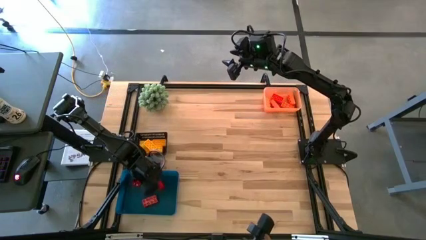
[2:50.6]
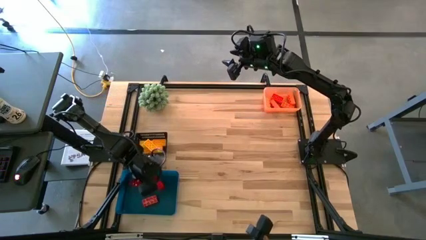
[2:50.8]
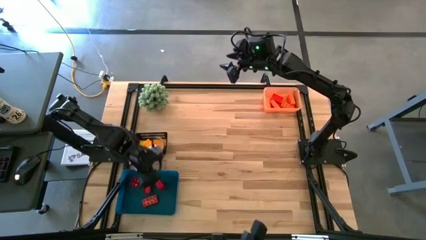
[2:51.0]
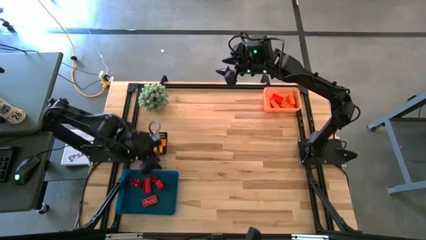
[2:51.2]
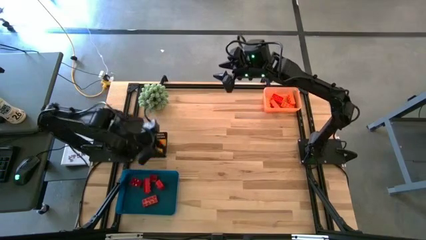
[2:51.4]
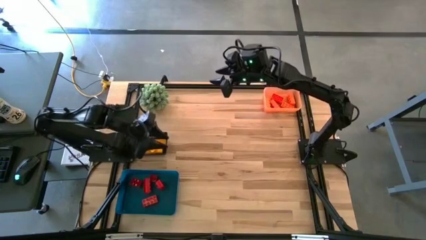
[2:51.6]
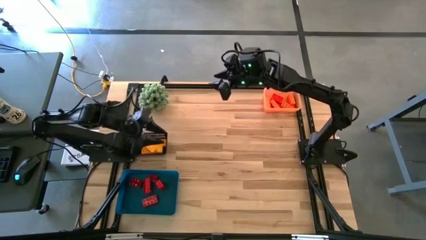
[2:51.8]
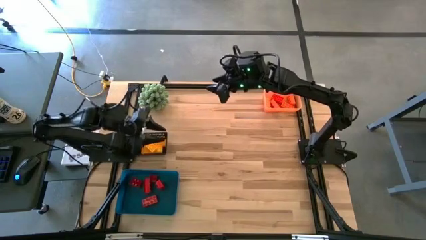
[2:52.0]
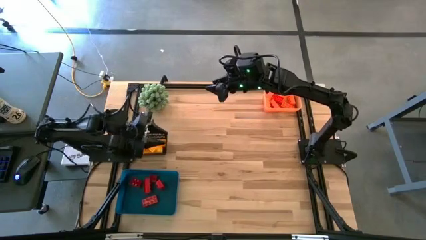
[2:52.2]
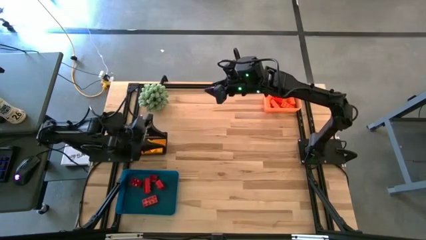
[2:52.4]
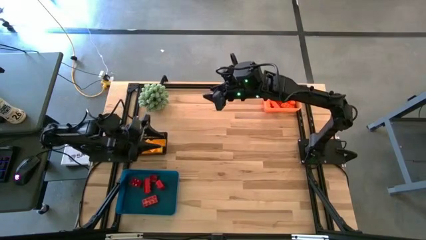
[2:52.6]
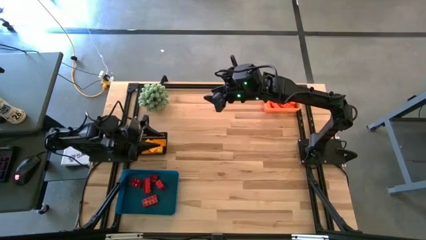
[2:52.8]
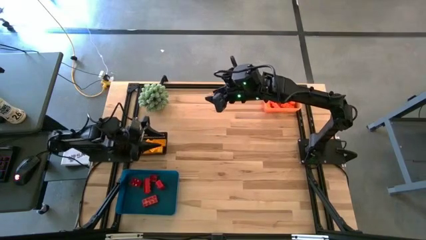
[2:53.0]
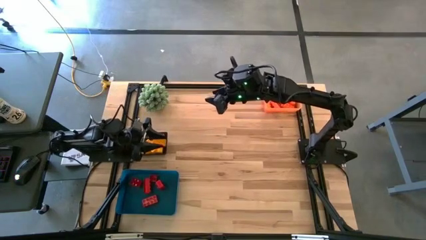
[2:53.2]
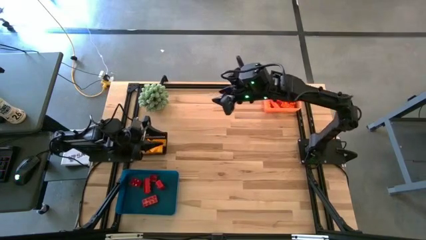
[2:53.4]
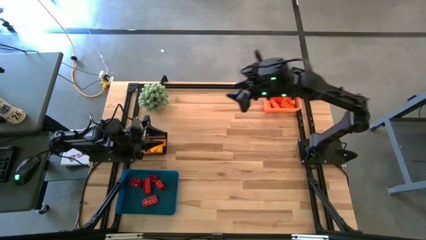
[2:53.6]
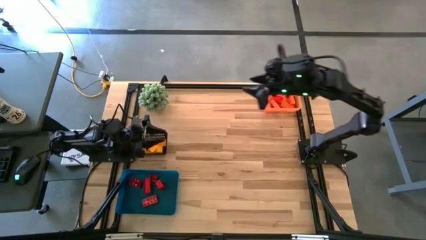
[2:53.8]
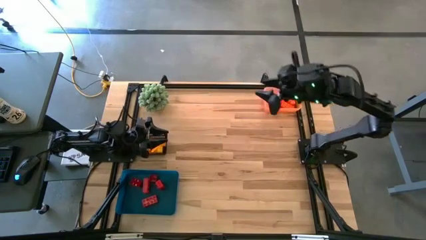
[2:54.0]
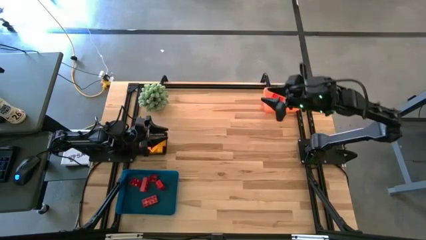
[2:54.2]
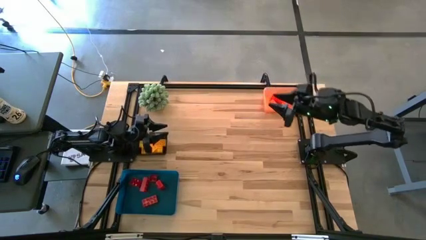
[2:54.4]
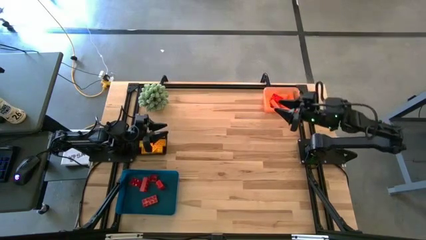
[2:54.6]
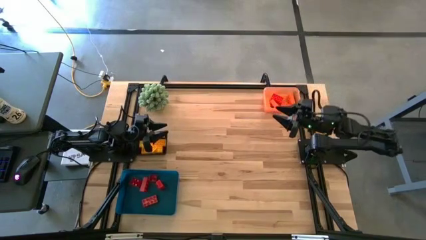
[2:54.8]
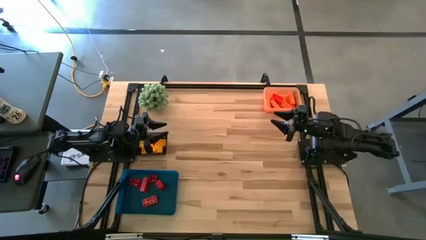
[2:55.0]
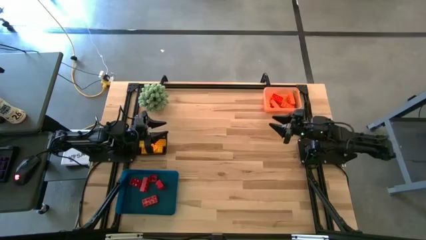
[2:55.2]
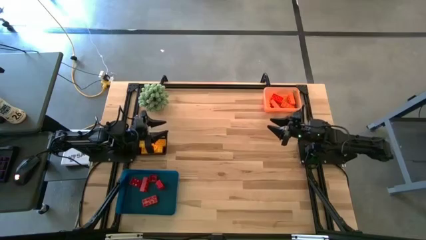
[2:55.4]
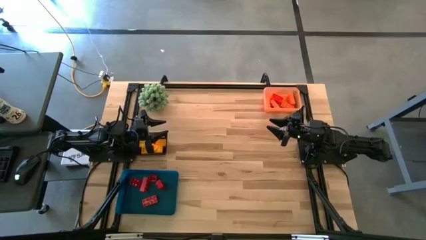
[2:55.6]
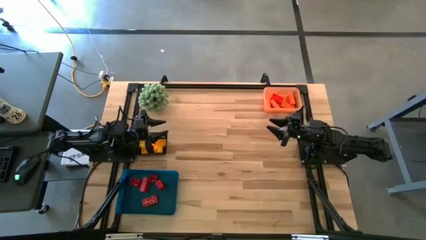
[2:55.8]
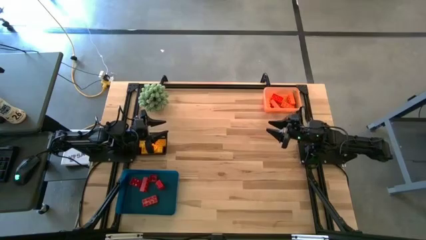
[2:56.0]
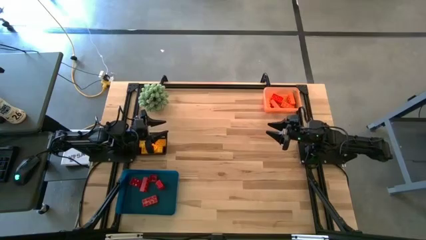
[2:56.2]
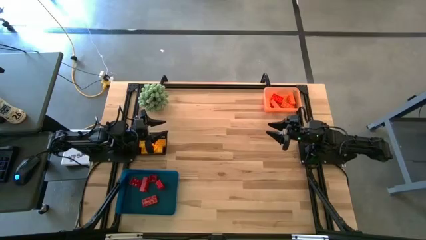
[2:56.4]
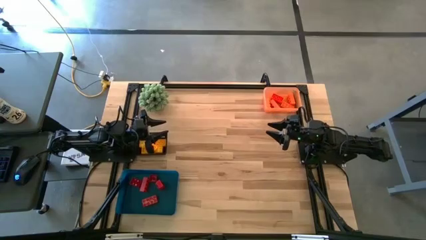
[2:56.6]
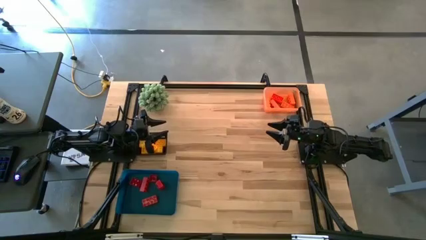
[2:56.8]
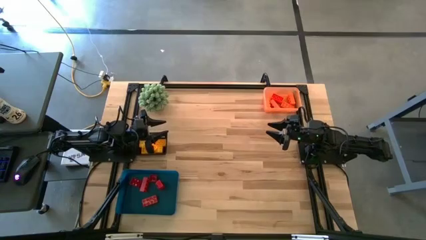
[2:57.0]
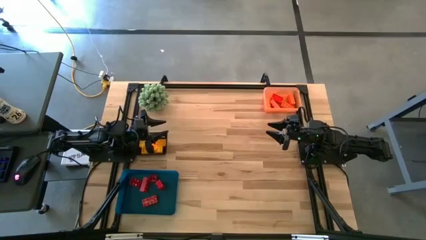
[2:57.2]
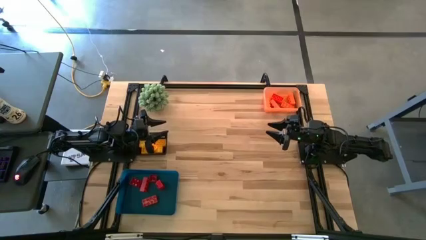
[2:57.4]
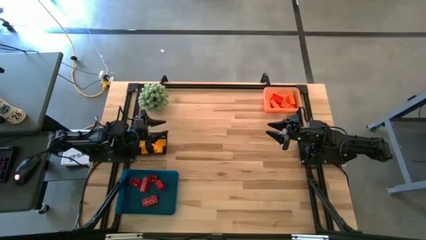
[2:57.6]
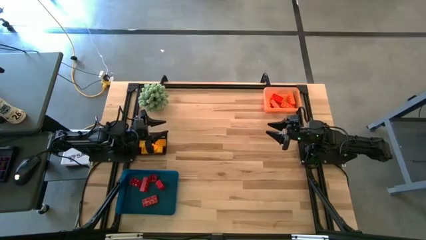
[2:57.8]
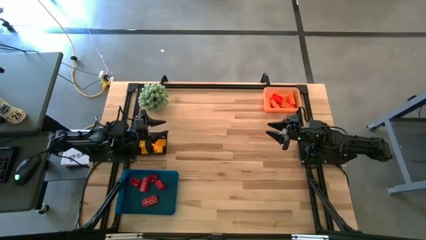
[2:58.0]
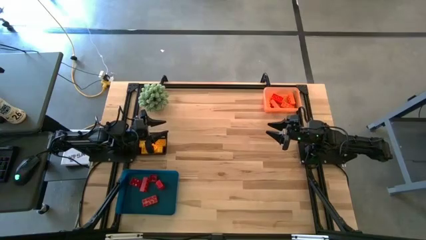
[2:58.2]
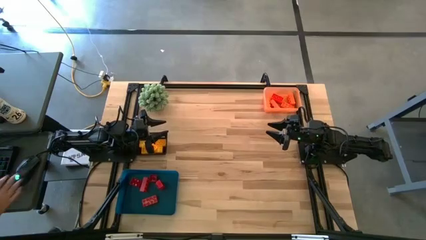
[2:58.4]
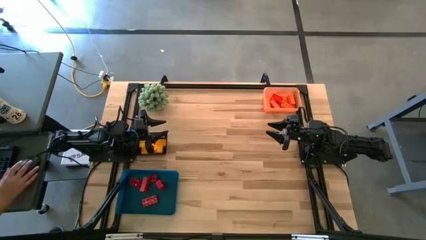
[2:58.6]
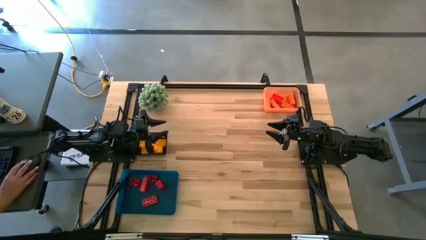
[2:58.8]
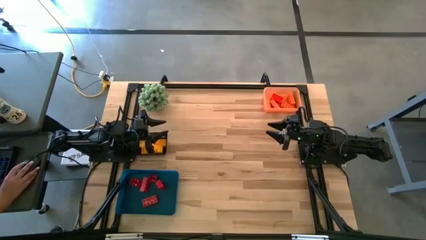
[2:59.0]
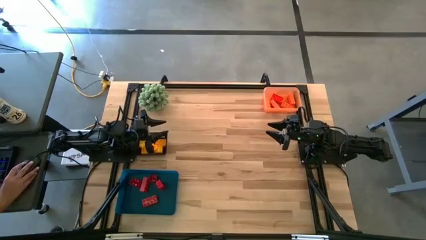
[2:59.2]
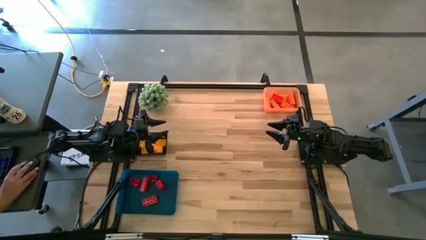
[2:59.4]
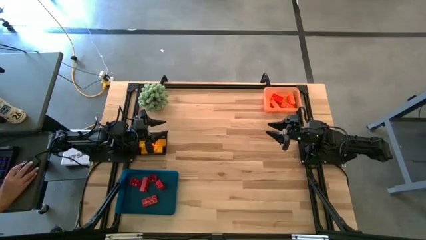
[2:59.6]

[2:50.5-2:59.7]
Task: Sort & place blocks by color
Return to Home Position

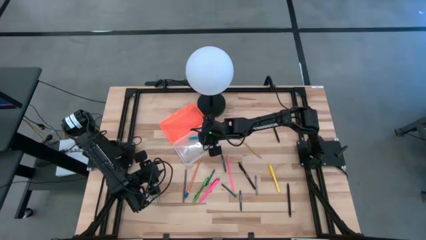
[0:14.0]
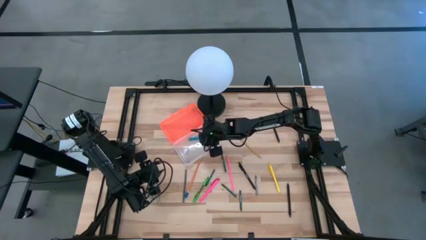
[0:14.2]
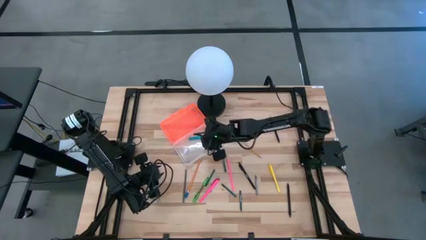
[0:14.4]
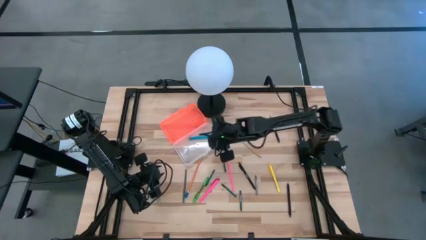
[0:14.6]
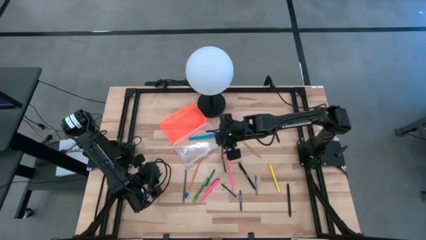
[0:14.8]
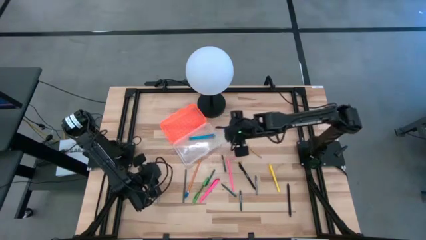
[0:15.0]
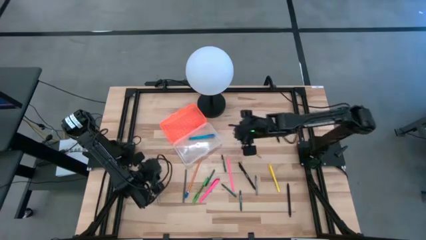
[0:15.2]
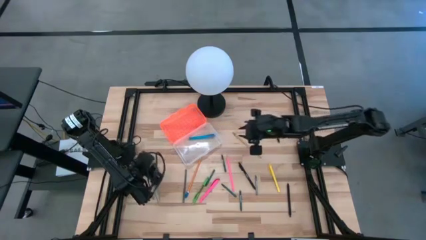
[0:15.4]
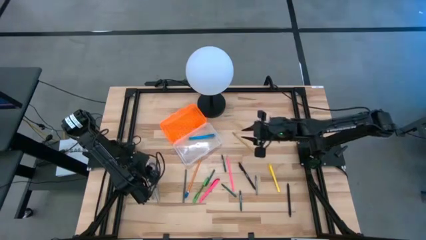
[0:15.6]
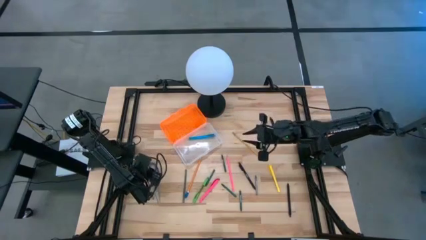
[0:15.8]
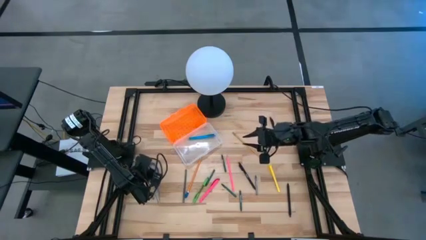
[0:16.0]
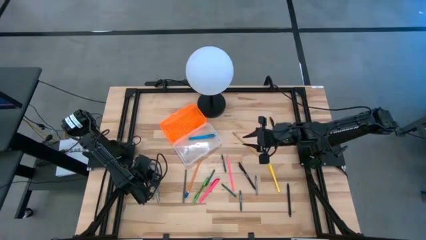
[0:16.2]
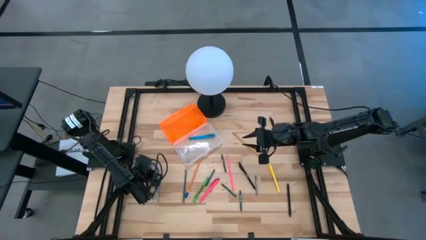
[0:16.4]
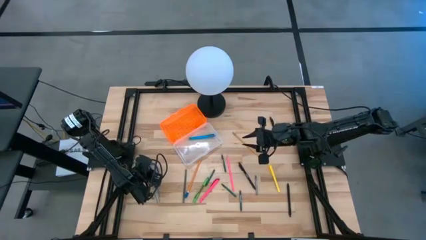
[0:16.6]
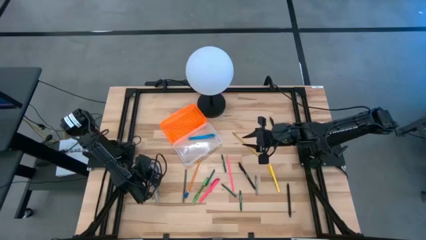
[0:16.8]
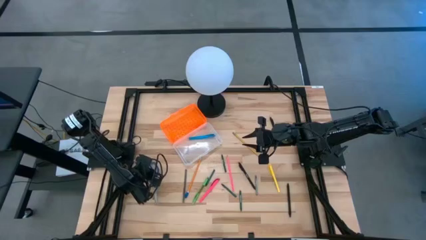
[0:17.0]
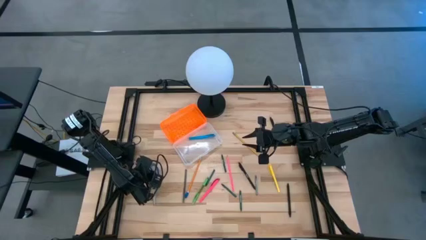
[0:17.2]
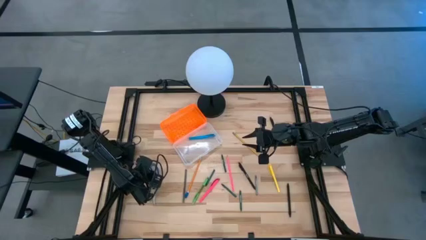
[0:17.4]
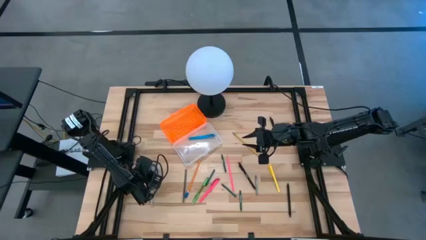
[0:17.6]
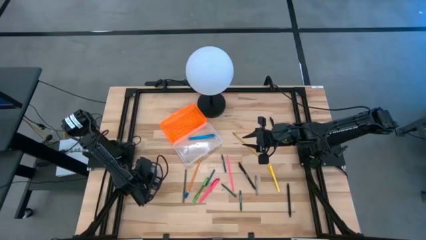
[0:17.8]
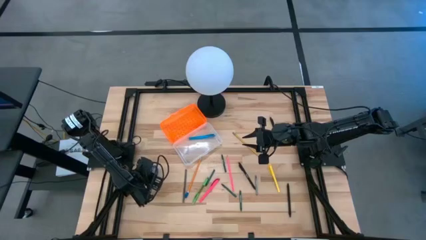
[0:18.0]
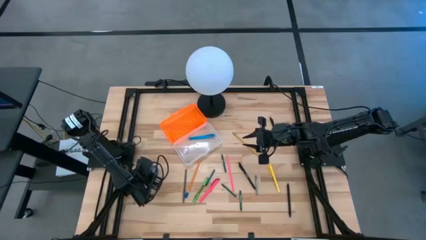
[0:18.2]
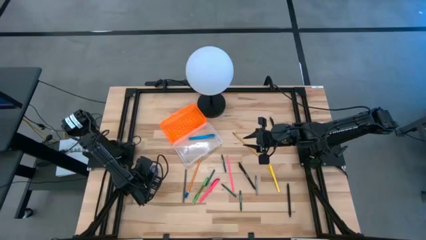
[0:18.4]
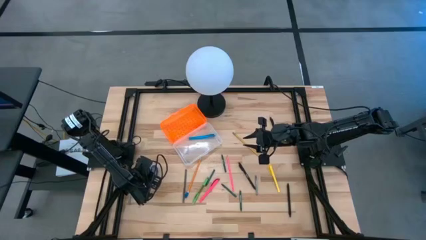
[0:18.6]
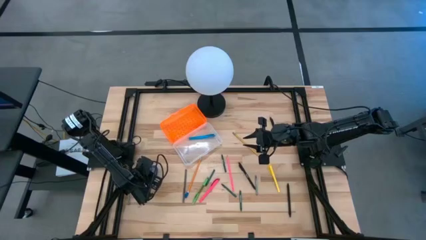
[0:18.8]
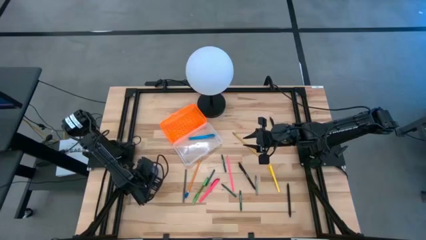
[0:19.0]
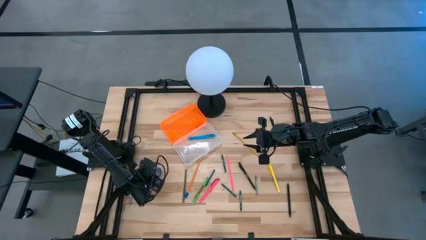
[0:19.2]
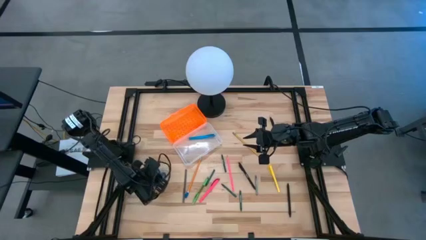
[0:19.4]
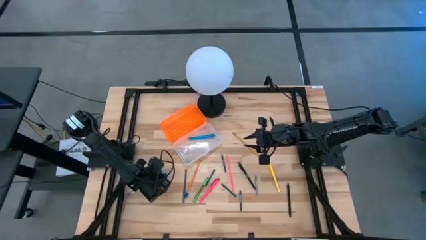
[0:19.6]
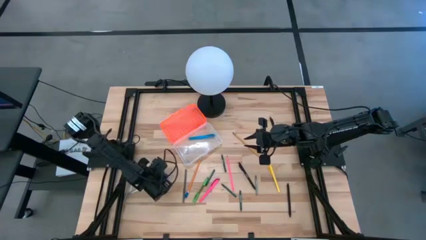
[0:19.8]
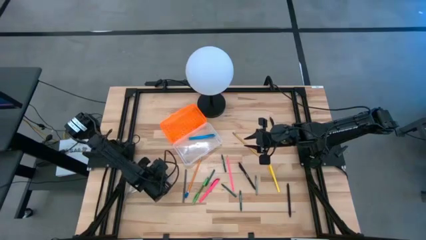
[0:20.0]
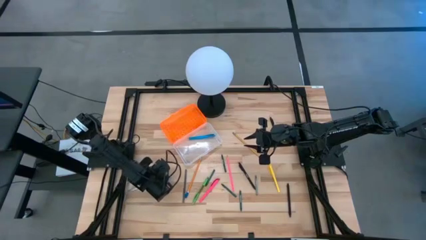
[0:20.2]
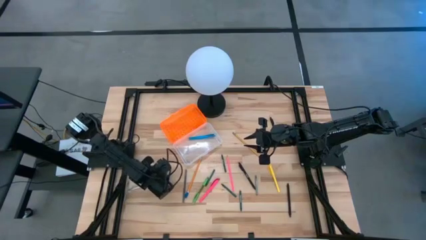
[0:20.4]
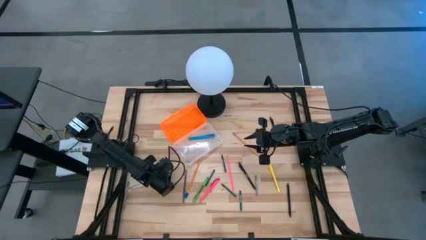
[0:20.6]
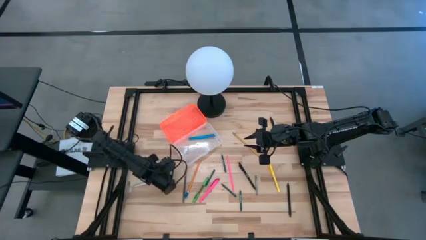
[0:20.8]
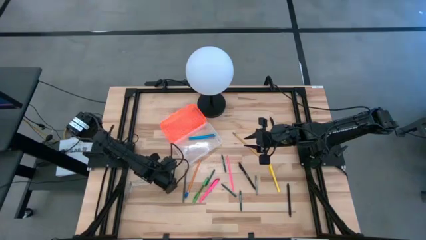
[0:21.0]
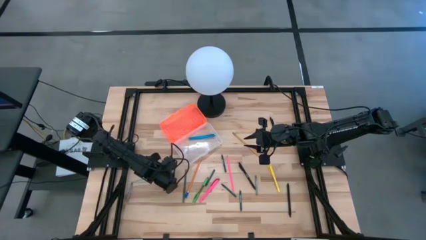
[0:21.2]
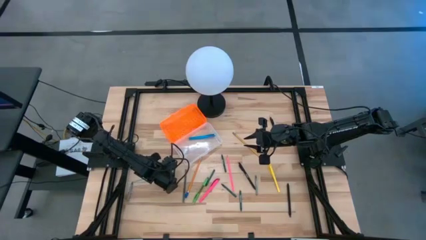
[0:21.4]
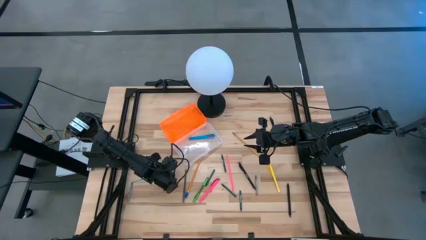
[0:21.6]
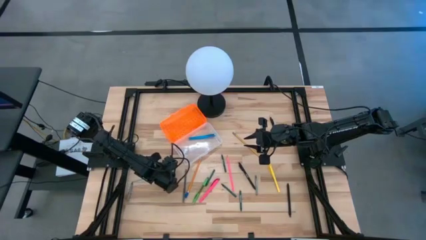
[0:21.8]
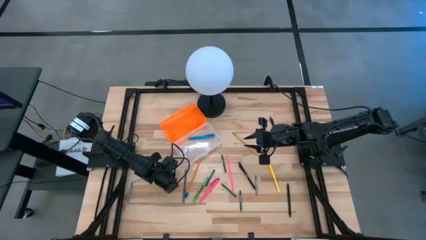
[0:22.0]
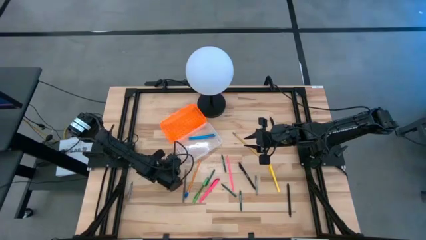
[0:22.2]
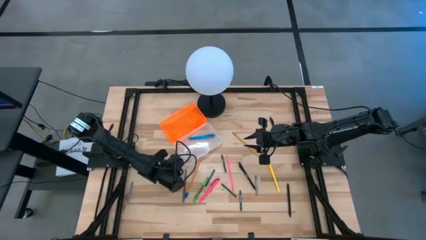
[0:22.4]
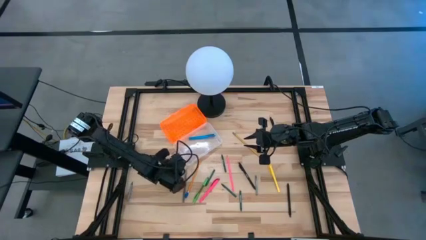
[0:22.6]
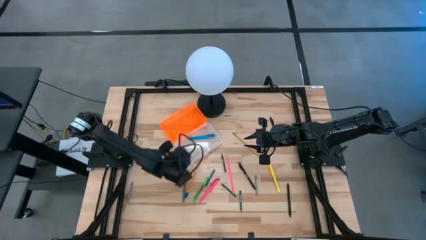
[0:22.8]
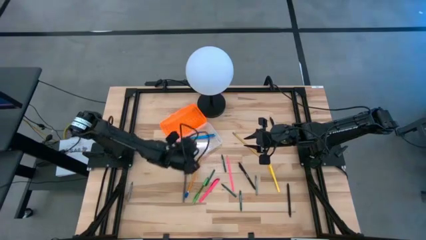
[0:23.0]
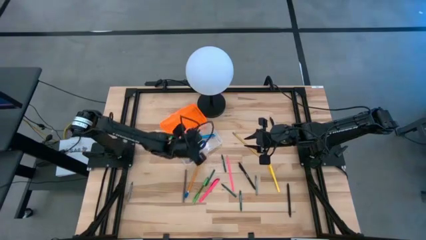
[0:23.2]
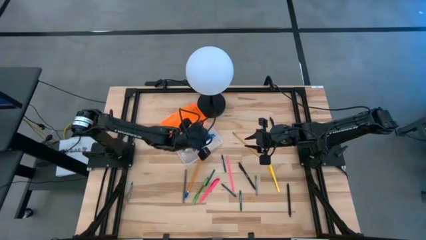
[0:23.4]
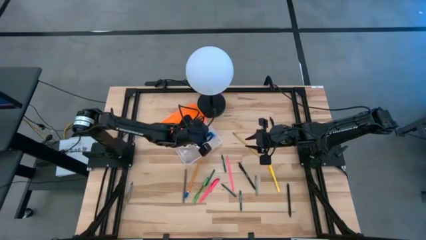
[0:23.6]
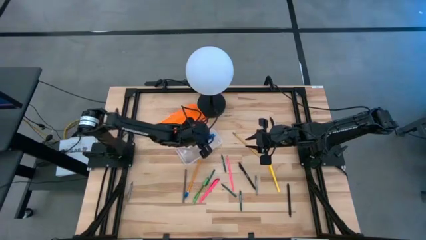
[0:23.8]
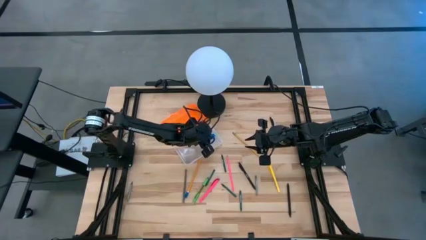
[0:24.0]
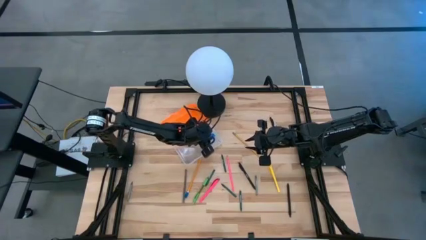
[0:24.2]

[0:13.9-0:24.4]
Task: Pick & place school supplies into a supply box
Put the blue scissors into the orange supply box
